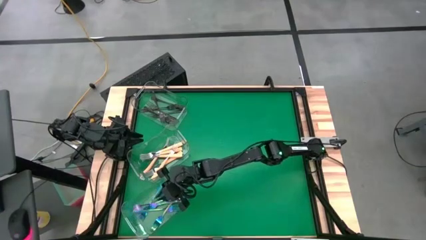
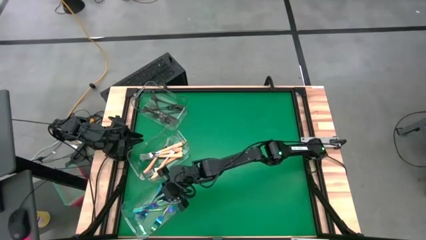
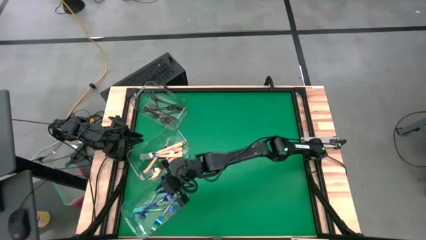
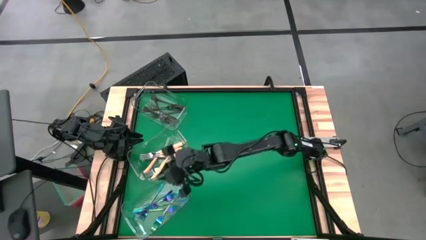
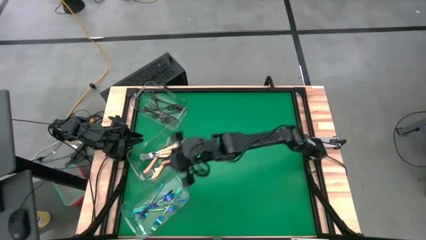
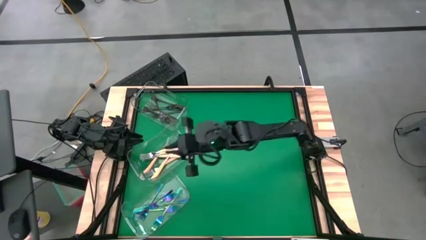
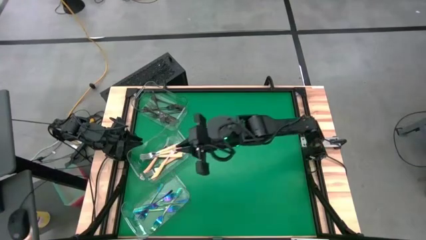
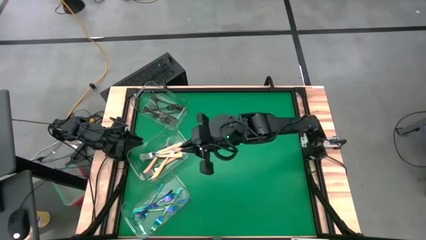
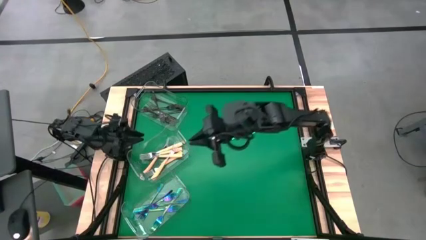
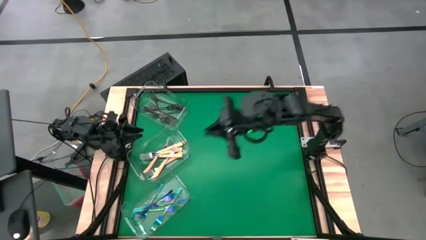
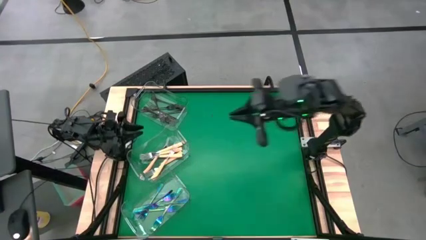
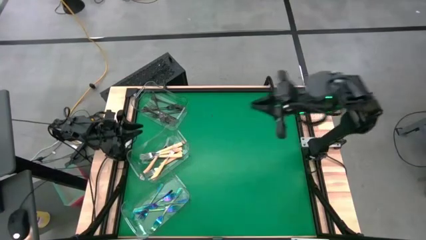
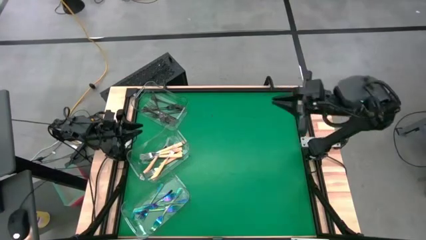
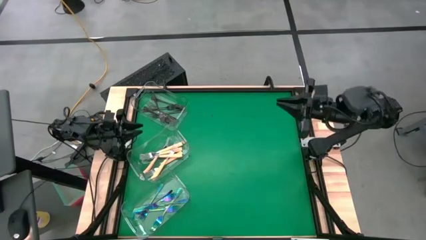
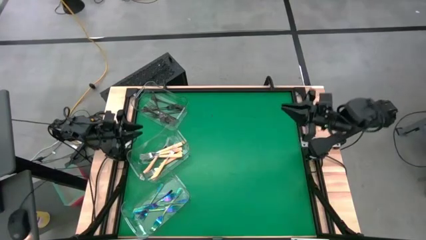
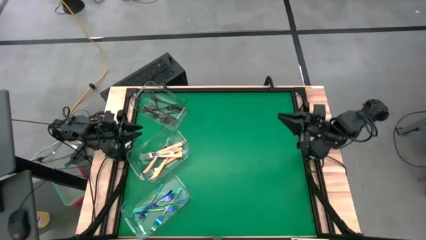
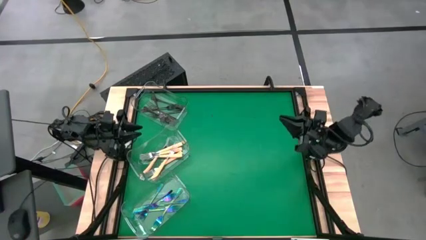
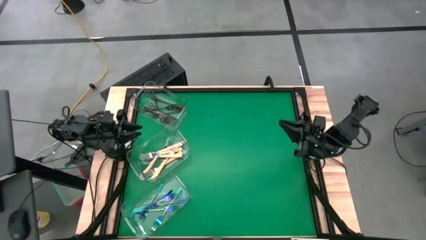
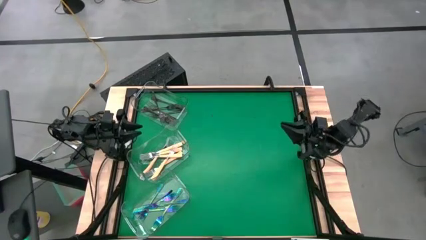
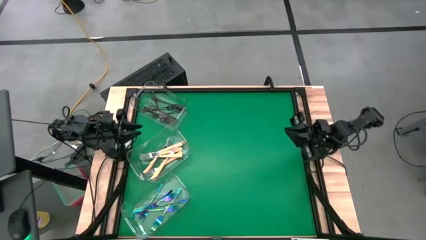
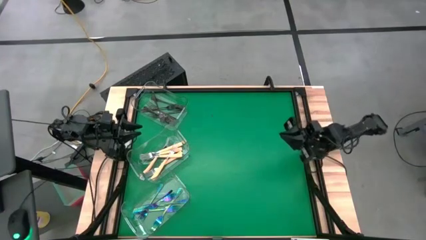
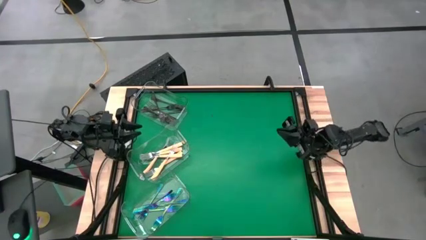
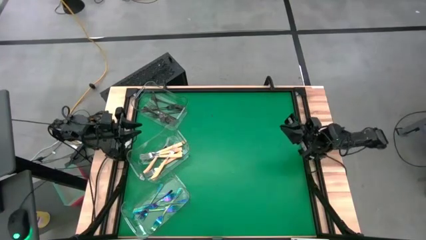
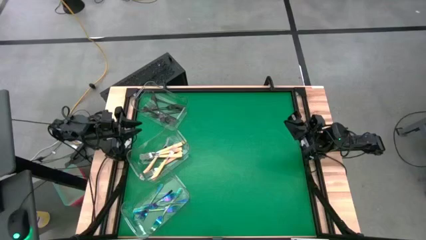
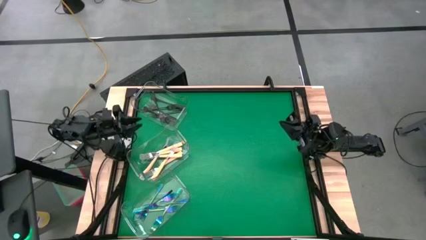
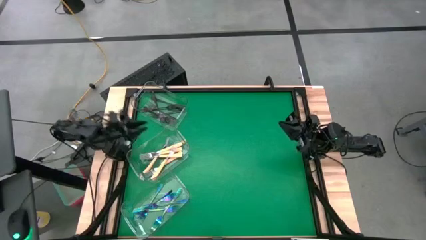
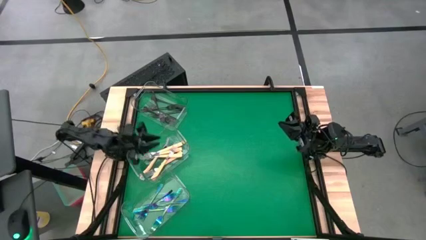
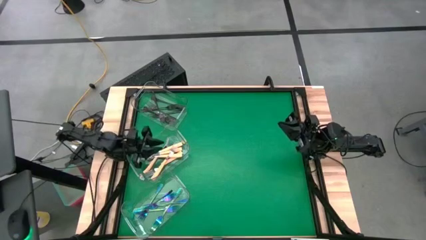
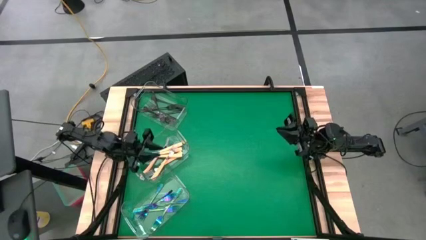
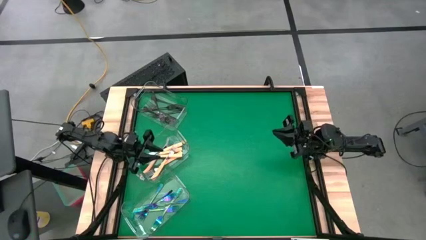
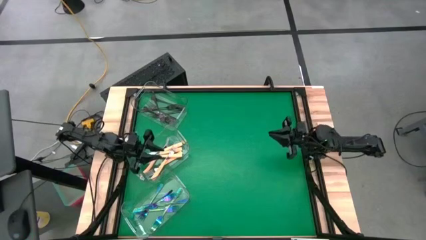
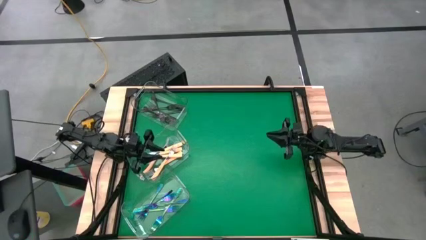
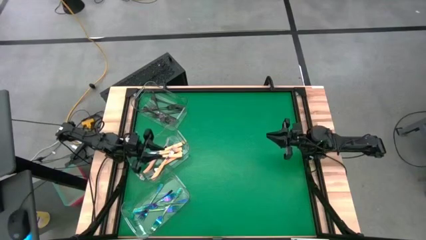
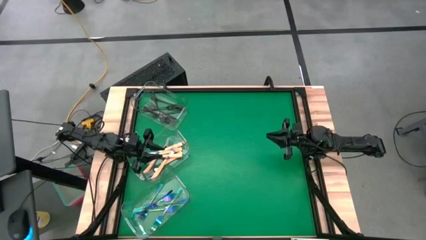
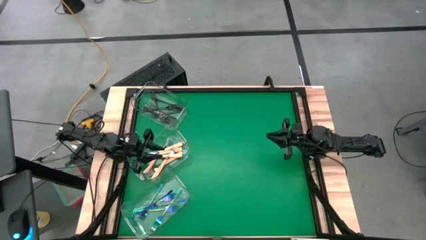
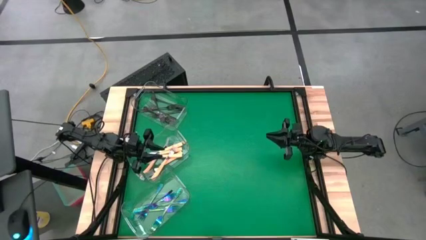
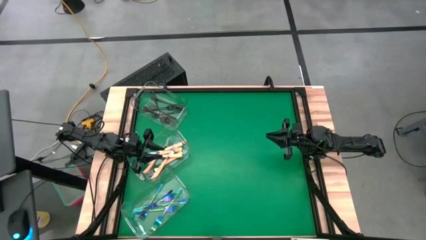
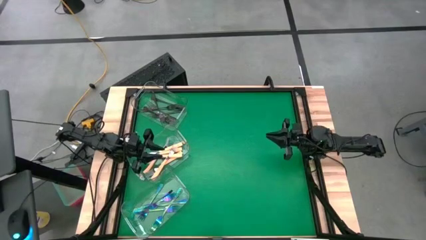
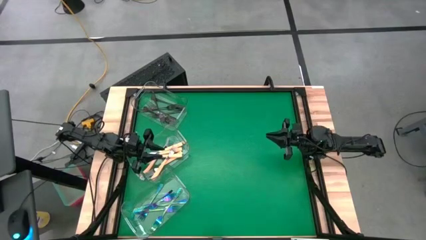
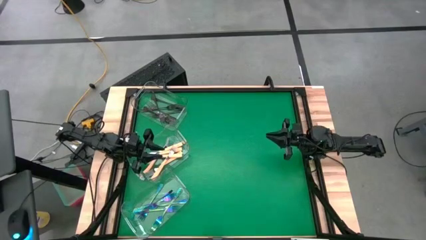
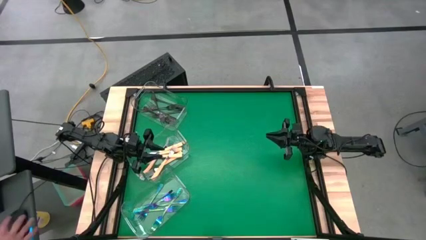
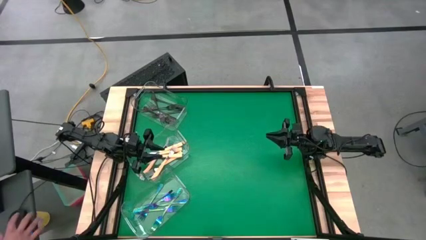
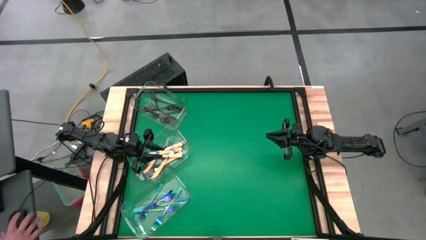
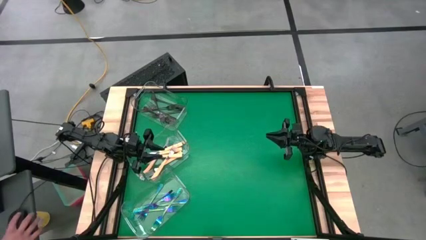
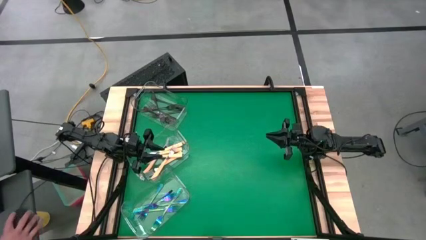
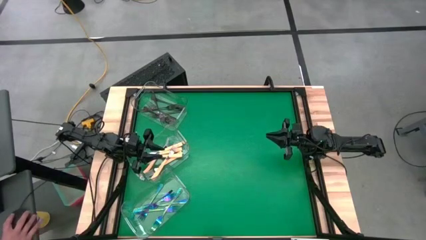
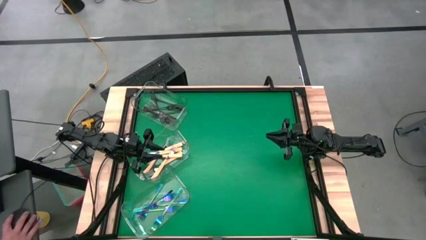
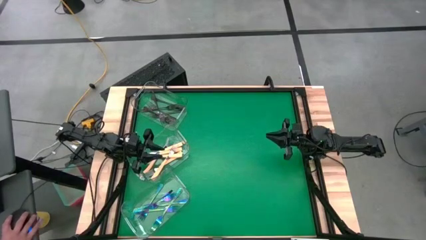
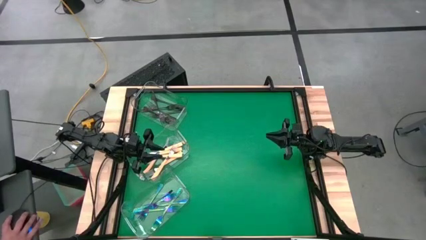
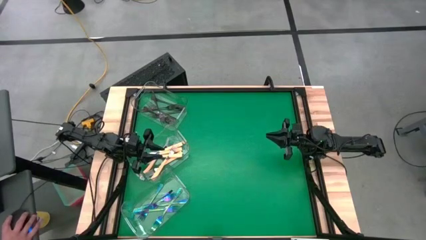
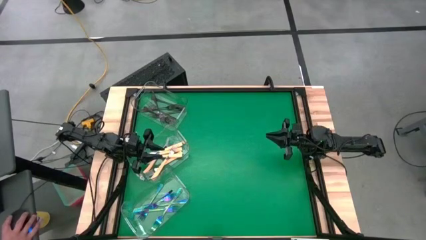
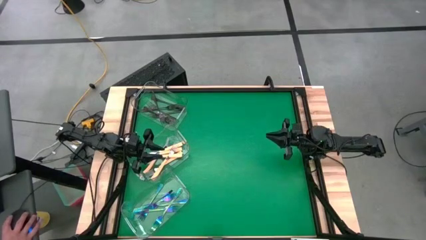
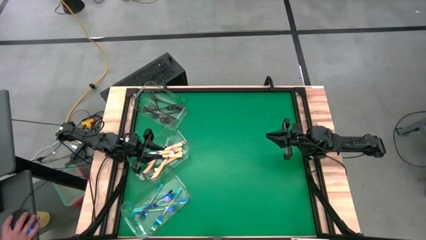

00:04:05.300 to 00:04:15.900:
Task: Sort silverware by color (type)
Return to Home Position

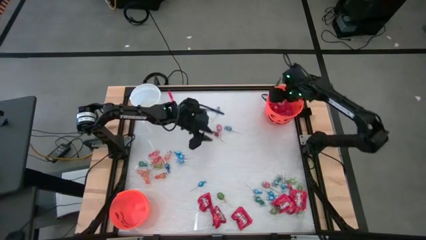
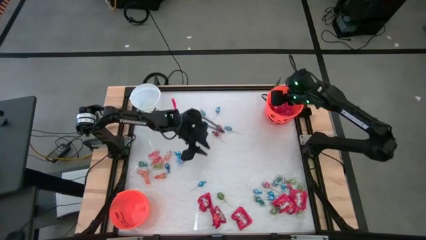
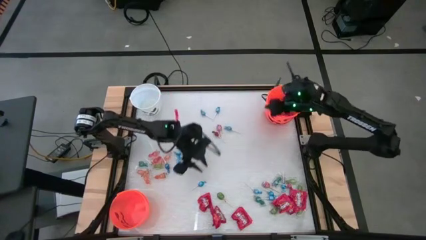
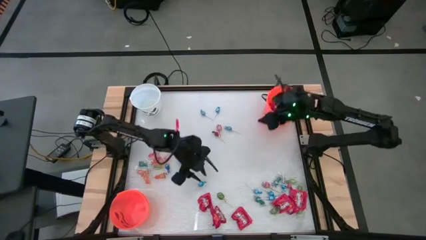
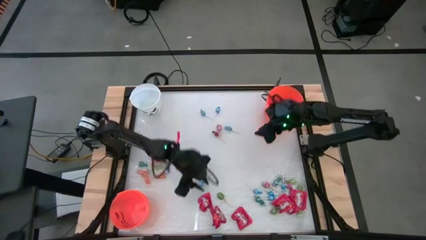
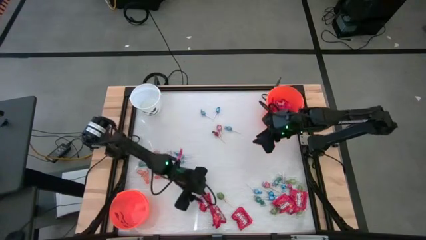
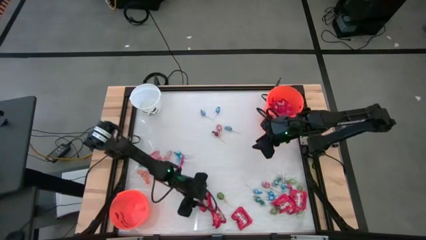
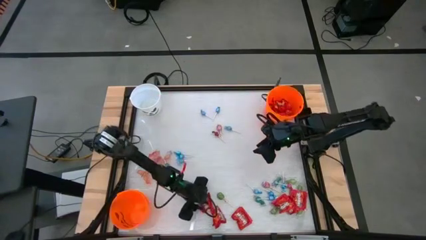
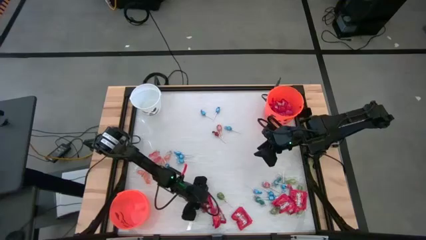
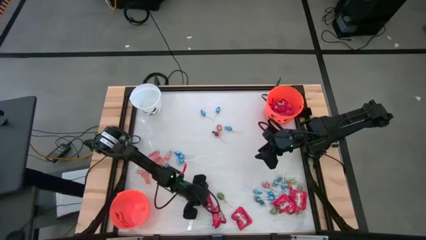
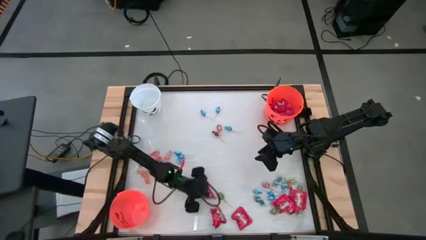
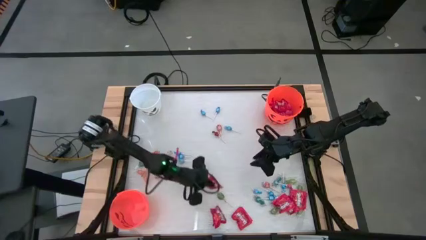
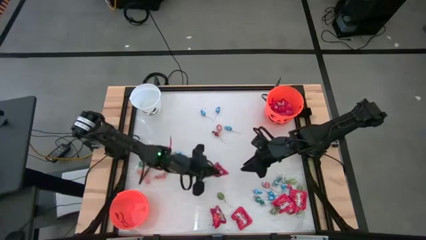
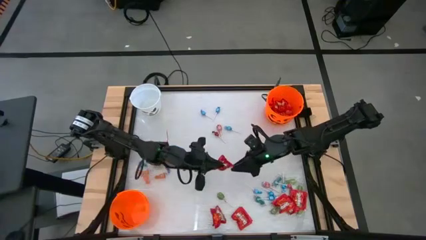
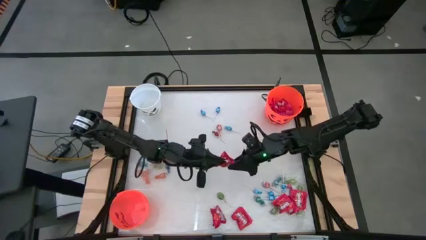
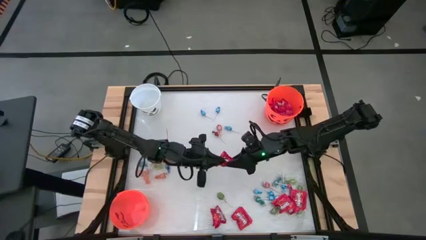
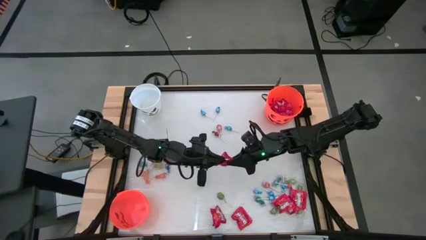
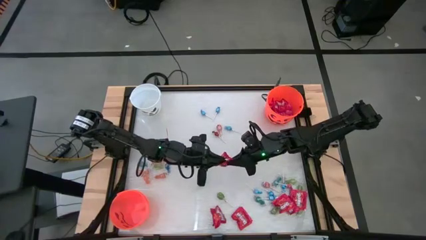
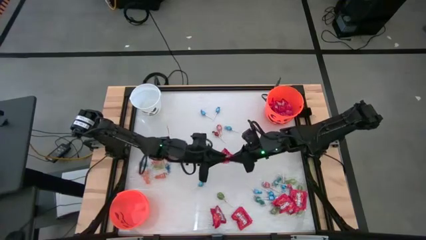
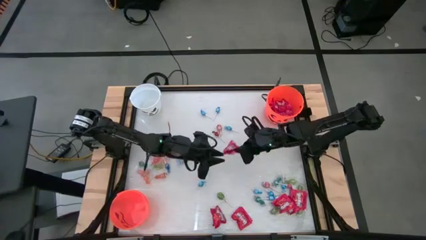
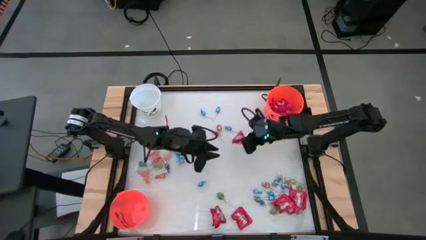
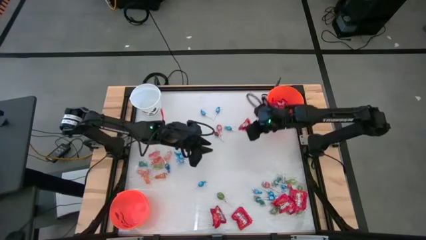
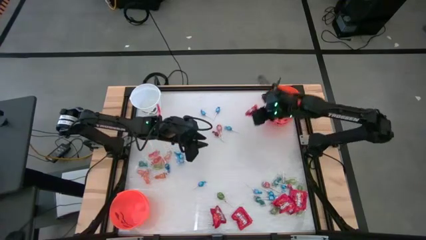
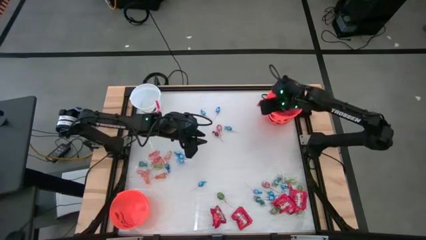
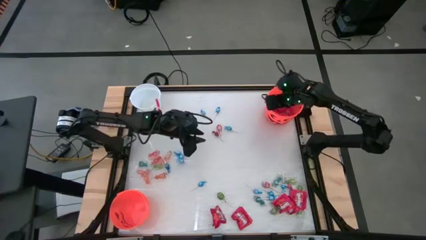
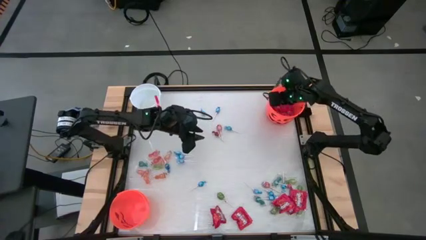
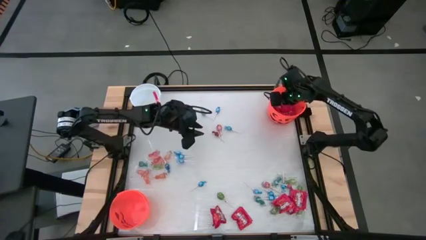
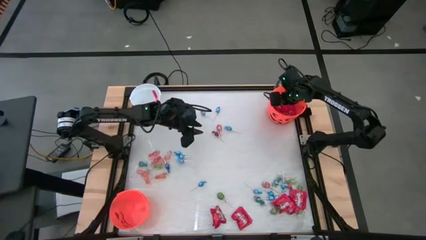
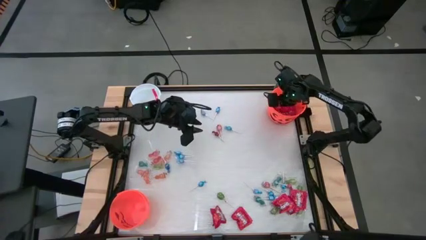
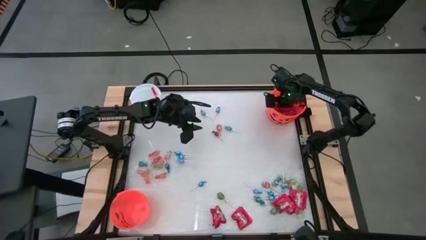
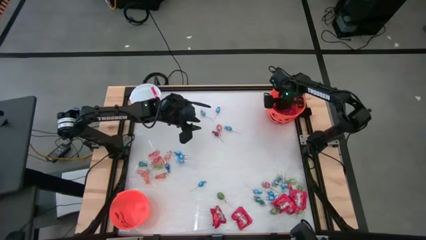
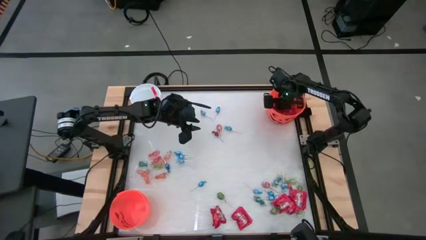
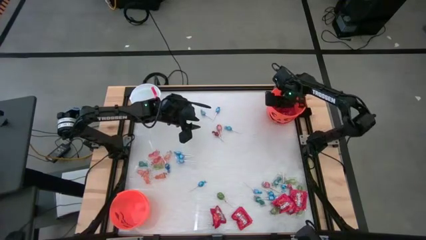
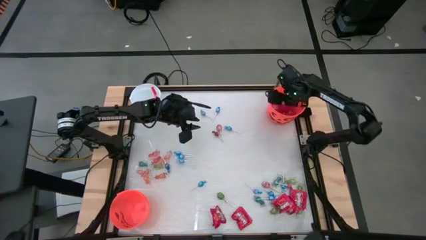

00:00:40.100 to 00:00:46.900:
Task: Sort candy by brand, put in halloween buckets
Put the red candy into the top orange bucket
